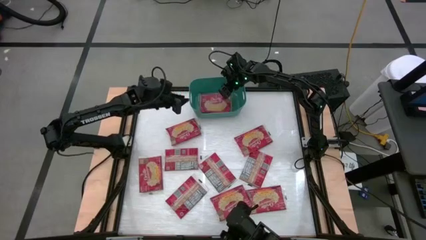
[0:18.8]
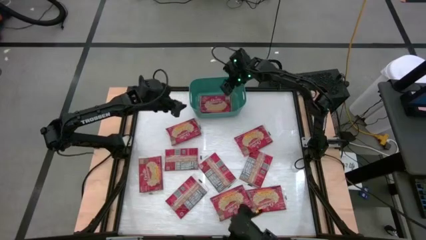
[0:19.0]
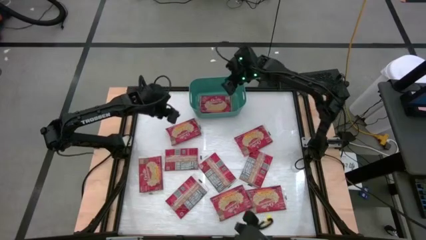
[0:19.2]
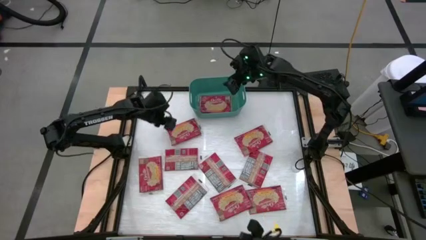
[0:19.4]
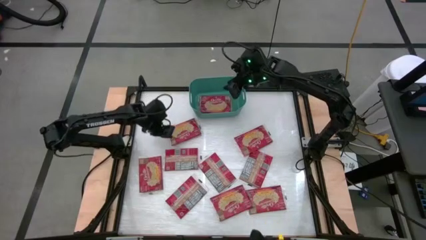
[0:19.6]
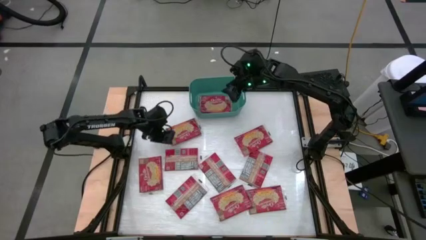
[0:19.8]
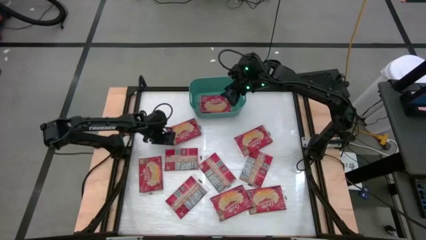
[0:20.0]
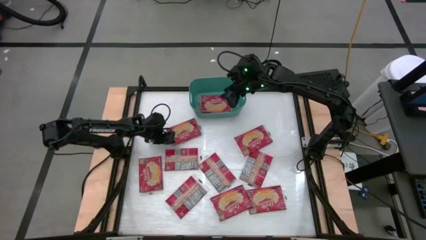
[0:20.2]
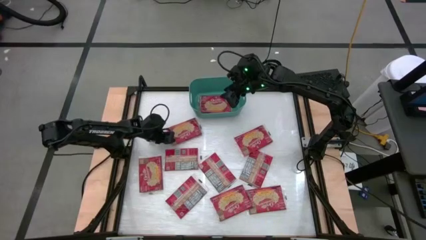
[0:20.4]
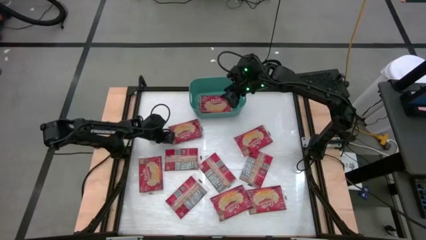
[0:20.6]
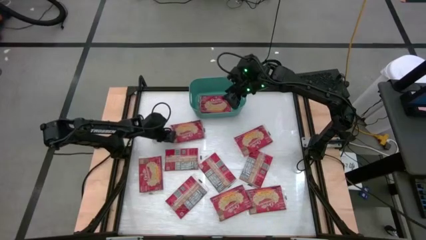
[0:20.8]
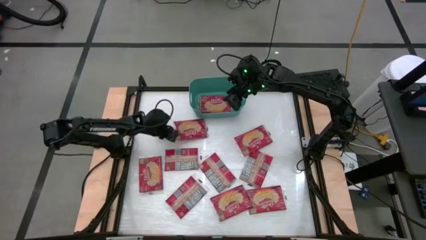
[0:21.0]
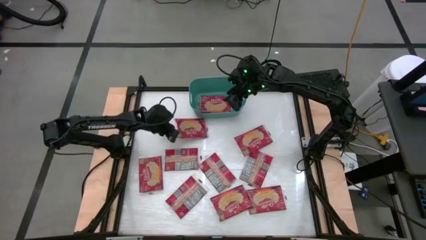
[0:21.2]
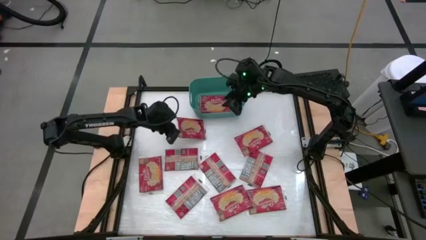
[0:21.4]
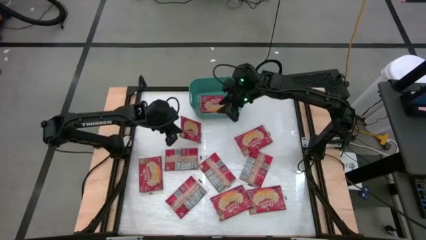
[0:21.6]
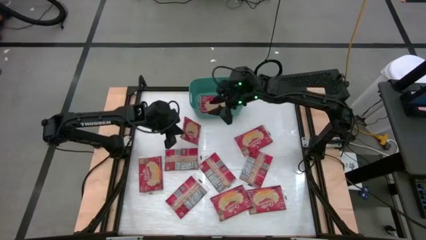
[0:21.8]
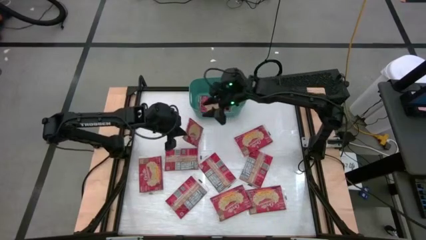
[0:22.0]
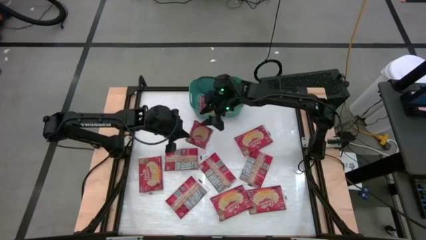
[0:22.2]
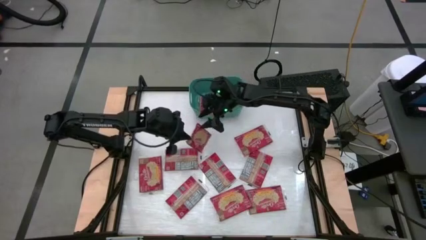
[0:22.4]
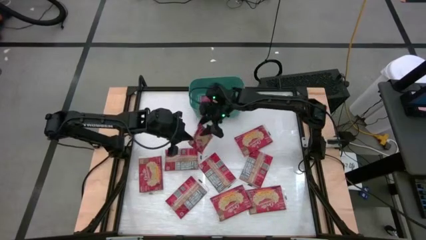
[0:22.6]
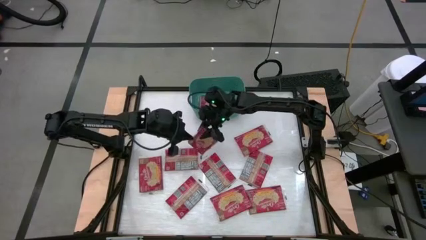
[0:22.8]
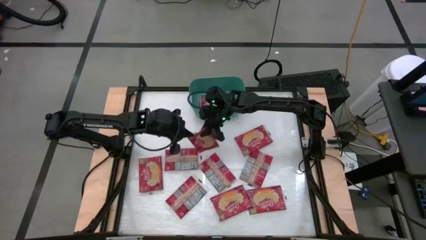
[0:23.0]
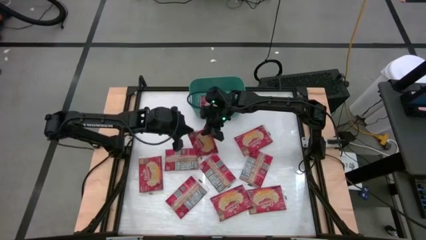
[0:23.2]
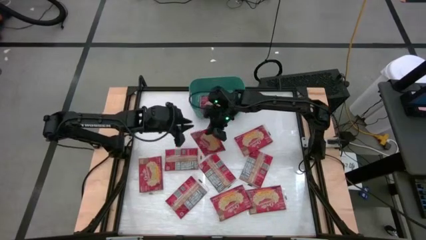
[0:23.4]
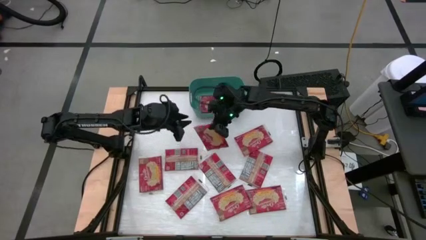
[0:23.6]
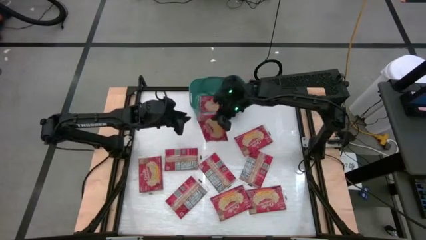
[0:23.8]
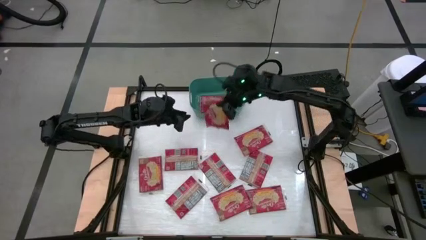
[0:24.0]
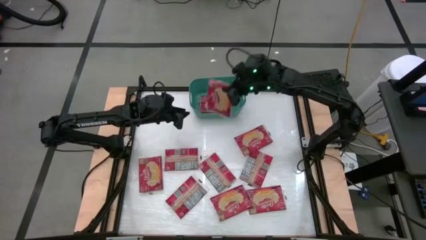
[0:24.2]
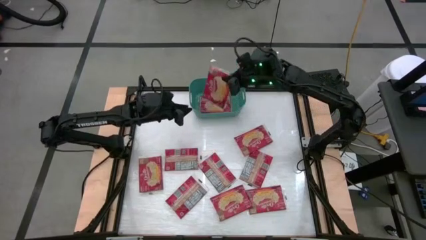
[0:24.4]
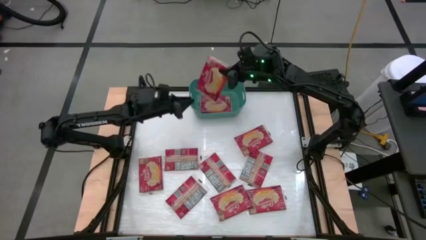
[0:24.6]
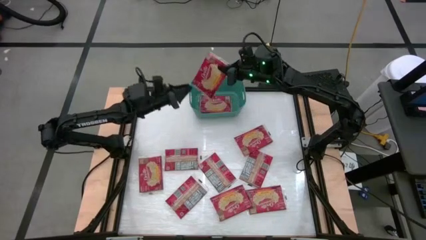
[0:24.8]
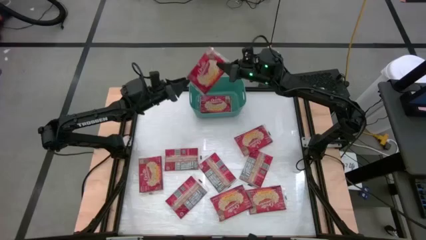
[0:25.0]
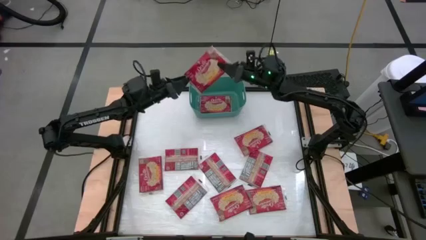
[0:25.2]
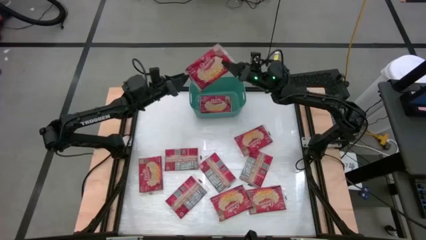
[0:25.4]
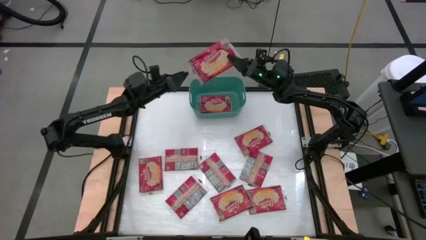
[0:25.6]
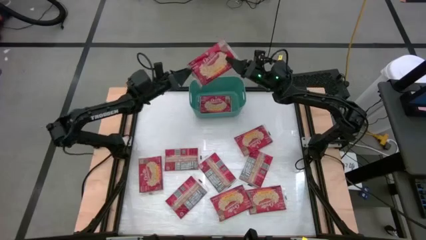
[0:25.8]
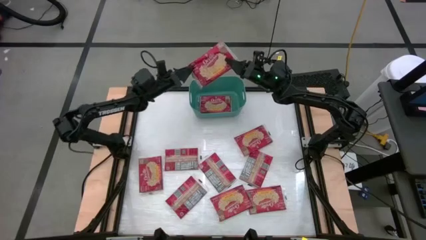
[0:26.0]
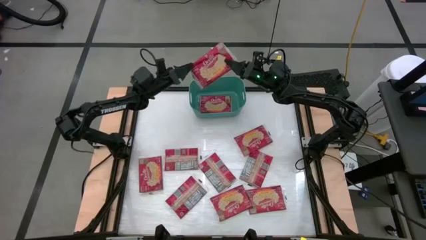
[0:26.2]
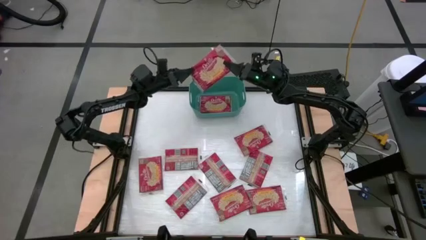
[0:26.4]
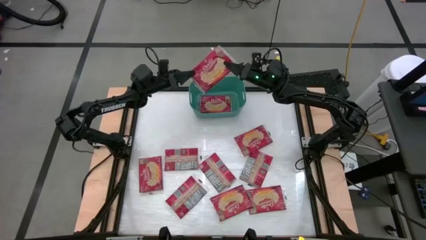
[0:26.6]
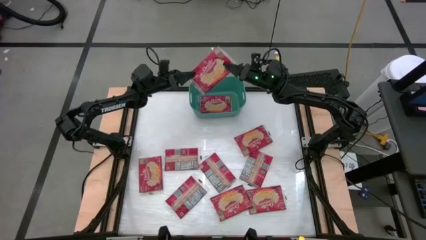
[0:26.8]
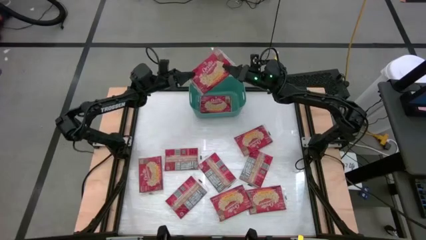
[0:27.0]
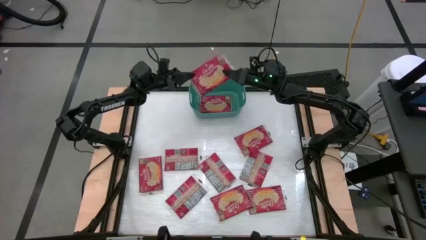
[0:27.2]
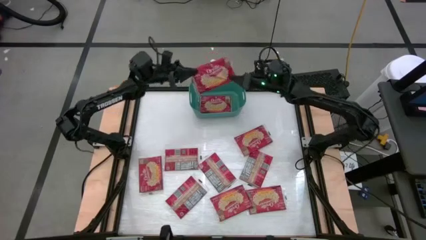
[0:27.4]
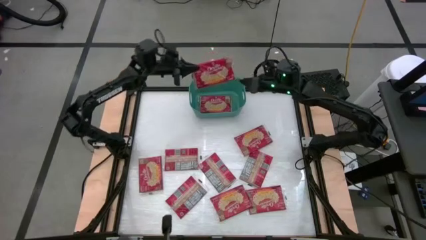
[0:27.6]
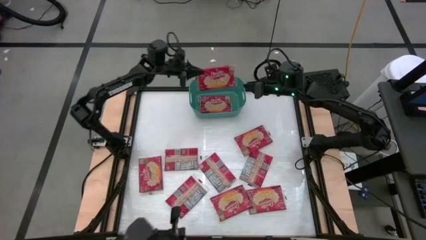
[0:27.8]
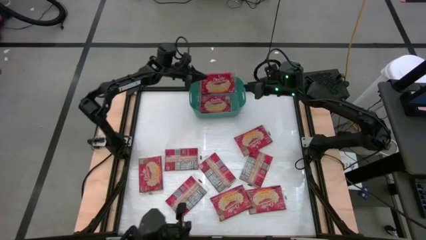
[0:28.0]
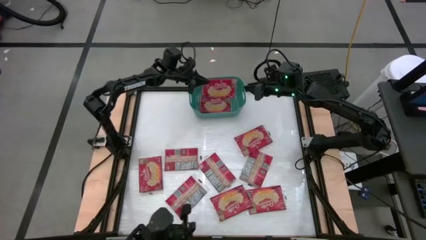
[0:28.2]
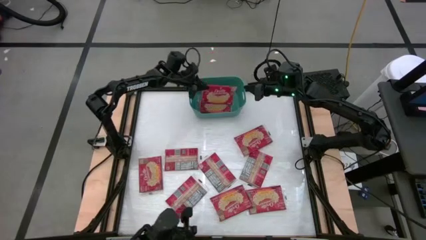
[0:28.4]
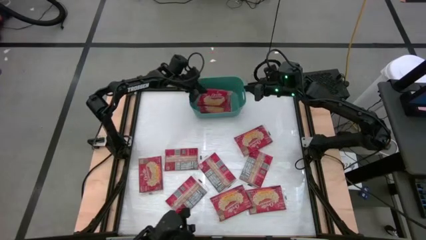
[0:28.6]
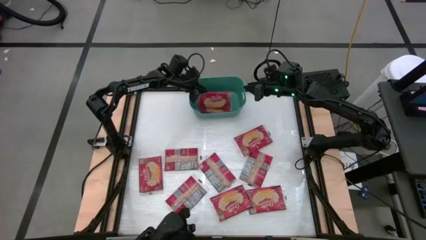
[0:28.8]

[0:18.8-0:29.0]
Task: Sort popcorn bags into baskets
Put the red popcorn pack into the green bin

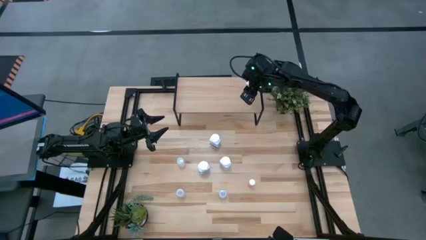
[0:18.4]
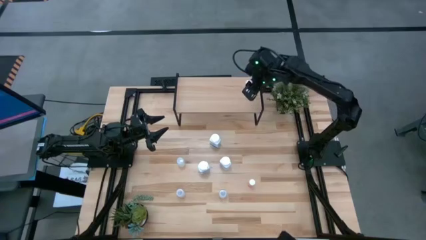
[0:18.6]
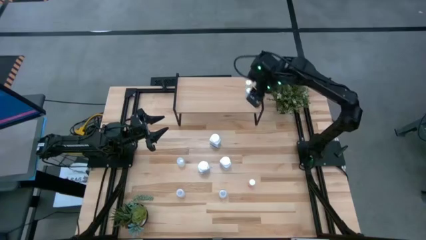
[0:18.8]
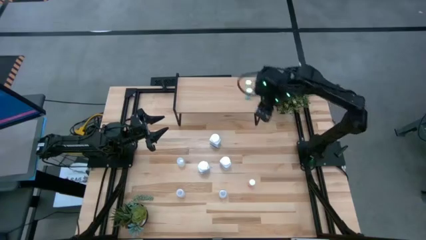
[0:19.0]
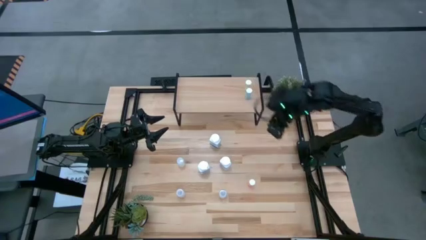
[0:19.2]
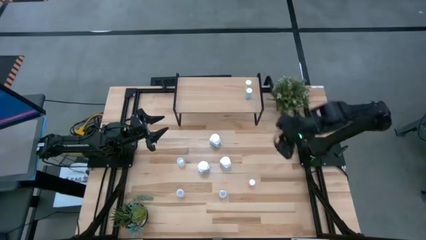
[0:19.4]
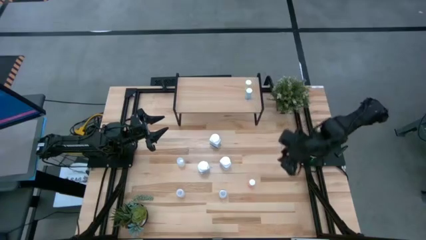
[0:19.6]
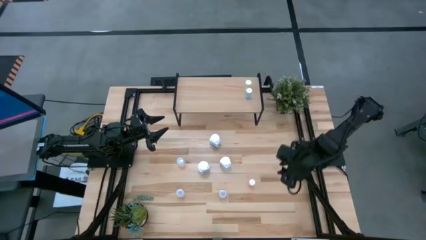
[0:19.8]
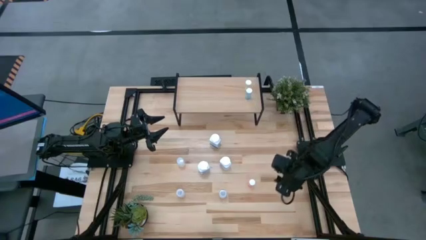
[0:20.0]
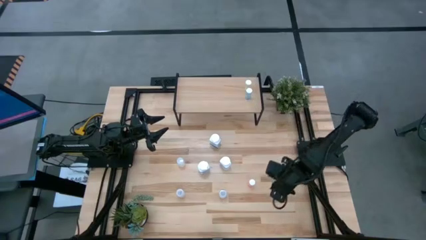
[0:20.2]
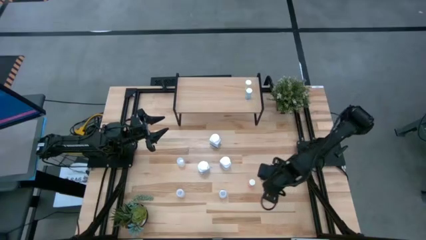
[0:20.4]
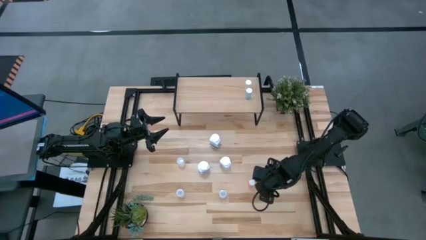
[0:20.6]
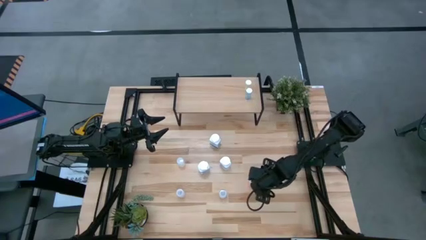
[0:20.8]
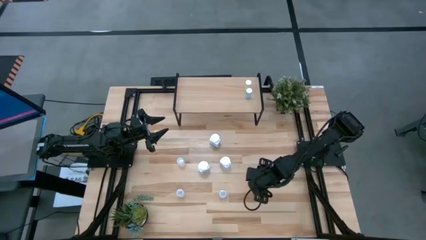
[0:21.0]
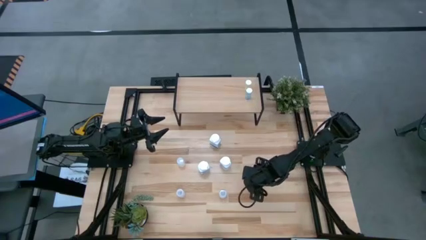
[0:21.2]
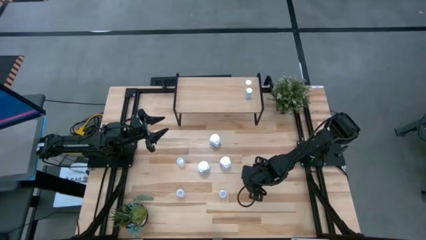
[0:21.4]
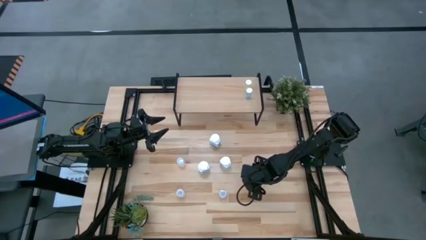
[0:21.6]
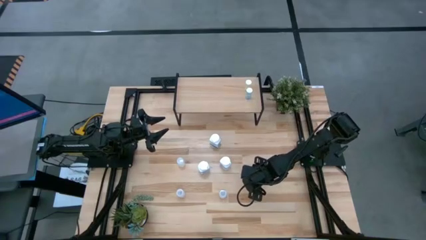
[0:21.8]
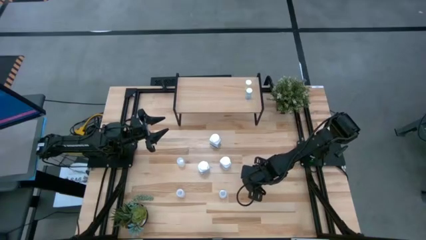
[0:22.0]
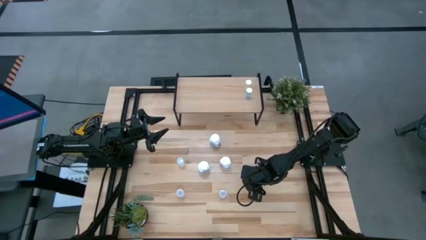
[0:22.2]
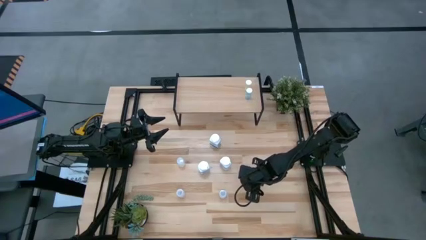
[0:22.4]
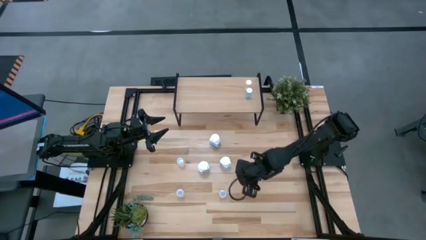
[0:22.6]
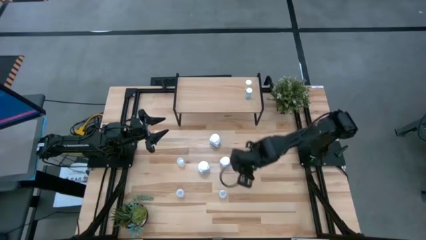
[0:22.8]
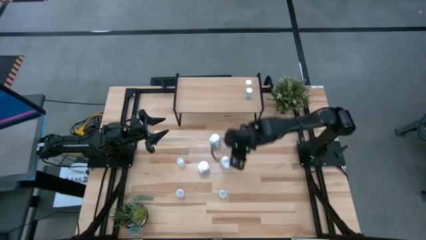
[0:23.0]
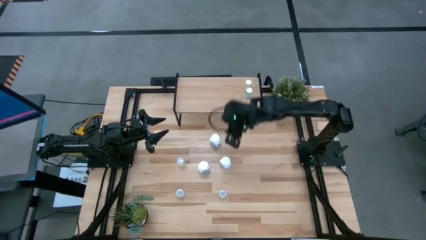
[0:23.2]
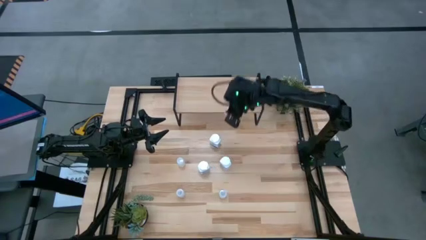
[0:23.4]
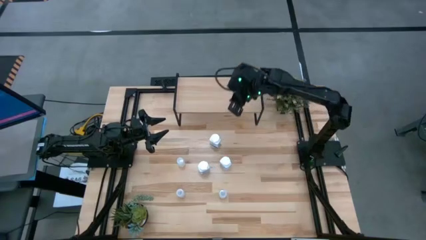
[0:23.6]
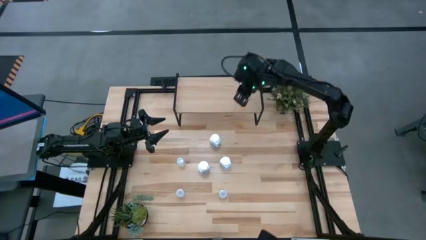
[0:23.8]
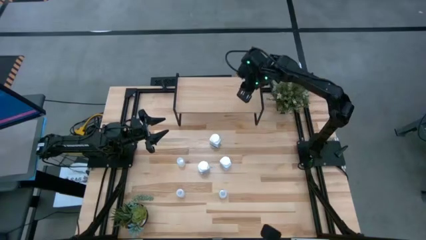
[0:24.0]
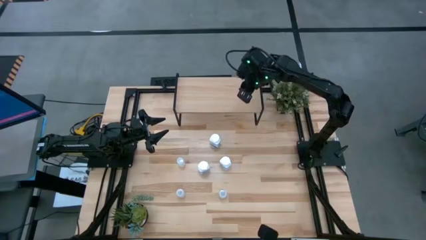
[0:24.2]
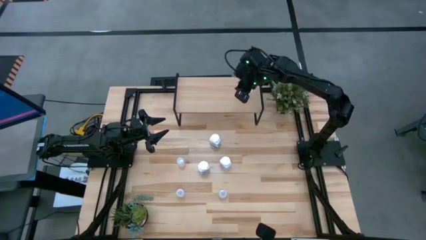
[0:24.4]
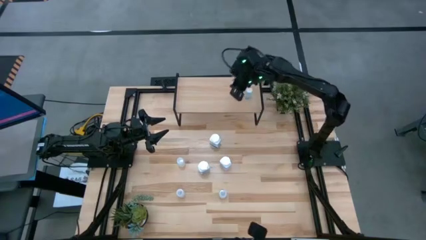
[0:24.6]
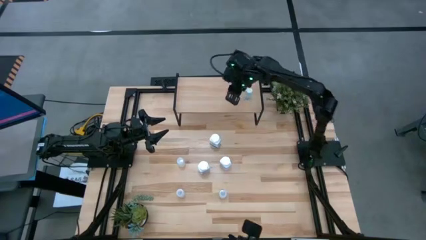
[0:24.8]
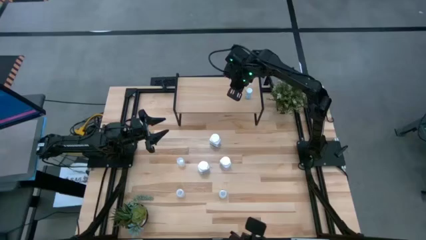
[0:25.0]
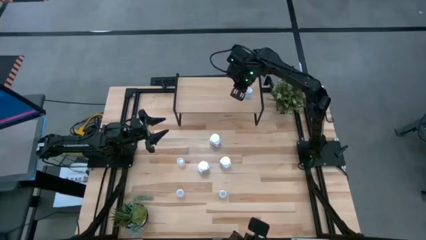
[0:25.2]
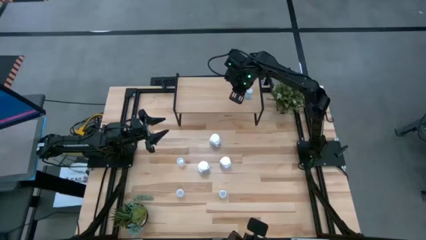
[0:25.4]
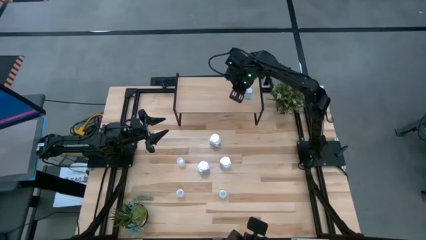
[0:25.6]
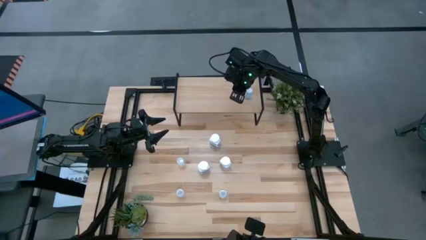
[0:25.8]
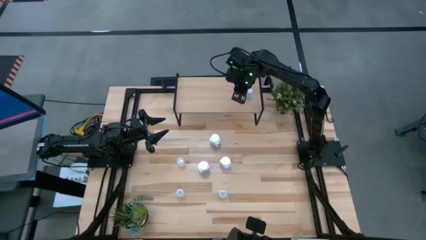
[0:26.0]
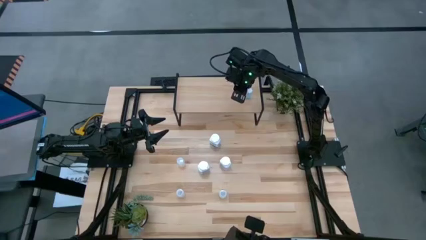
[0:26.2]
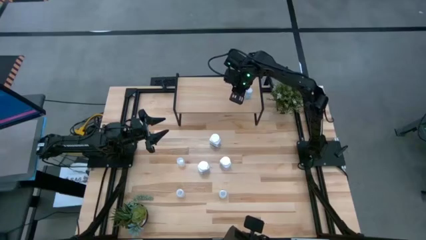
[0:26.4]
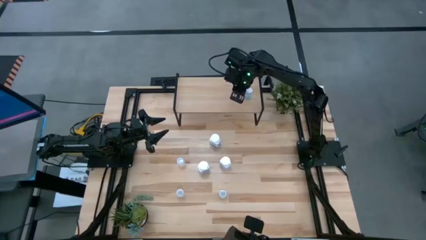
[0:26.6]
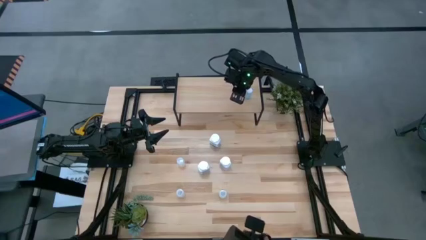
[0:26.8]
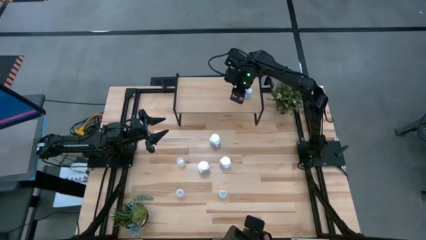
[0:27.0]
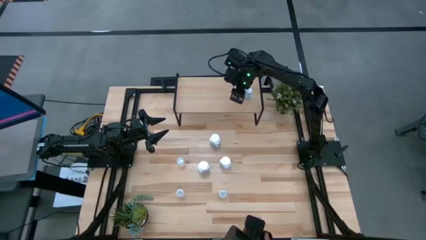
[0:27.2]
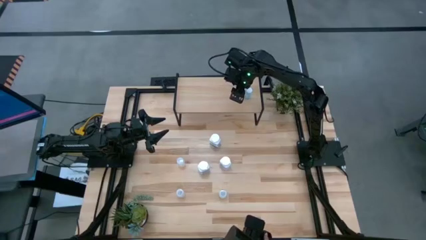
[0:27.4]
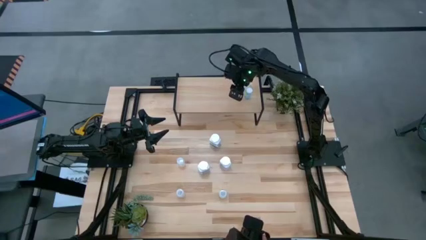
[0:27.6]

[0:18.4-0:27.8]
Task: Pick and place medicine bottles onto shelf by color
Put the red medicine bottle on the shelf
